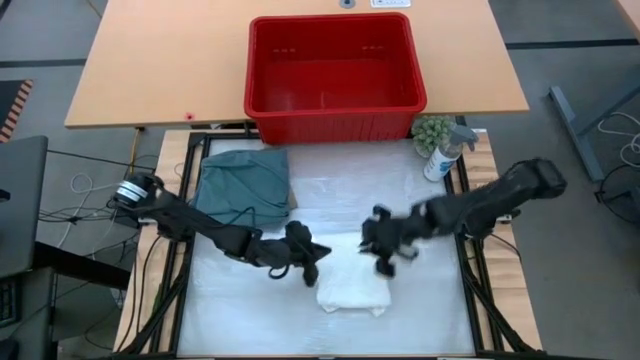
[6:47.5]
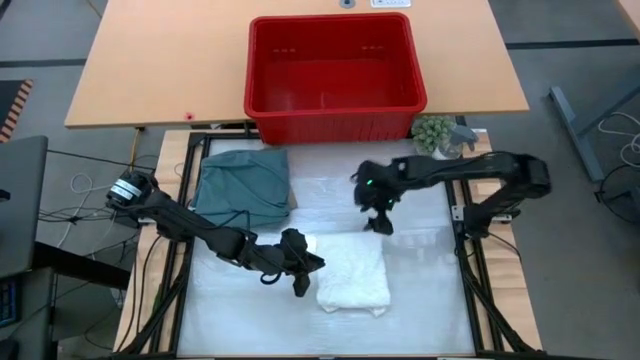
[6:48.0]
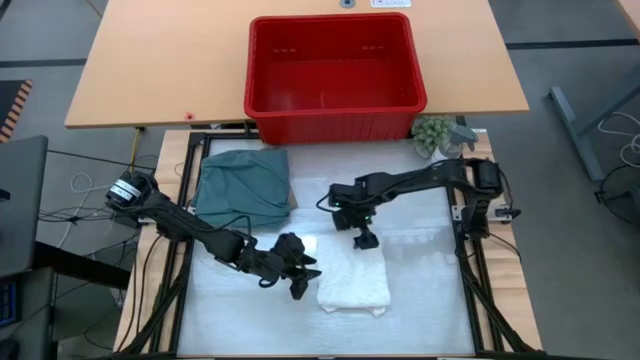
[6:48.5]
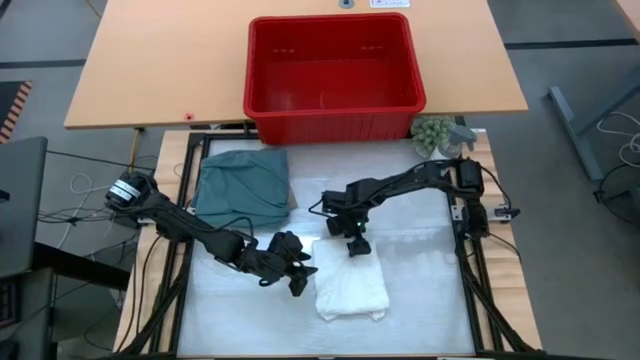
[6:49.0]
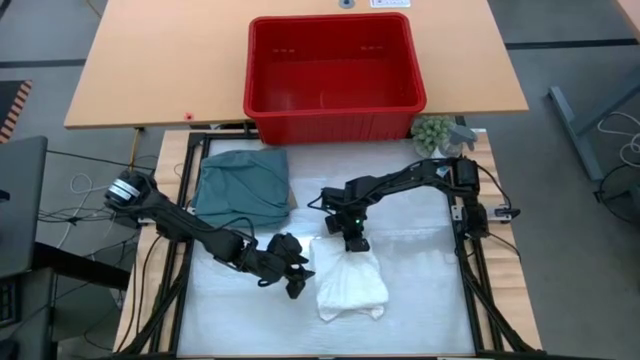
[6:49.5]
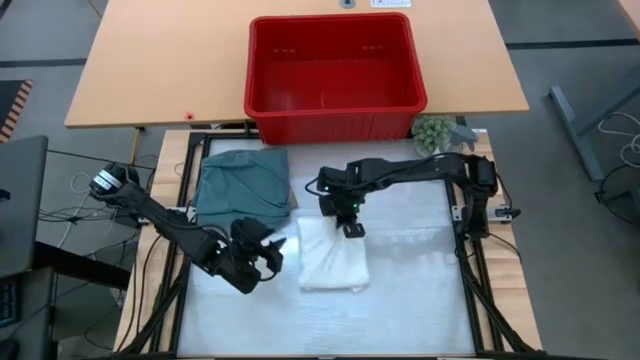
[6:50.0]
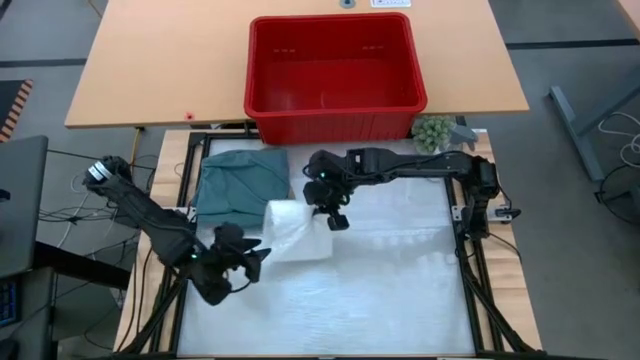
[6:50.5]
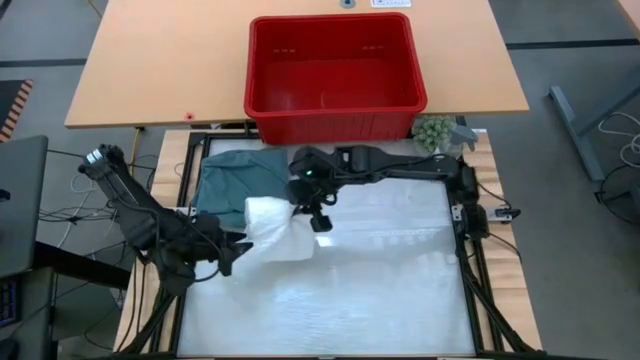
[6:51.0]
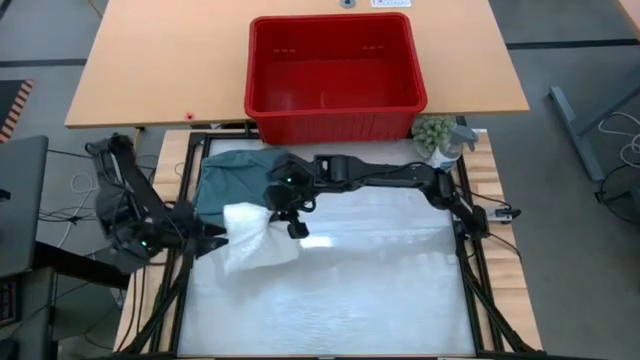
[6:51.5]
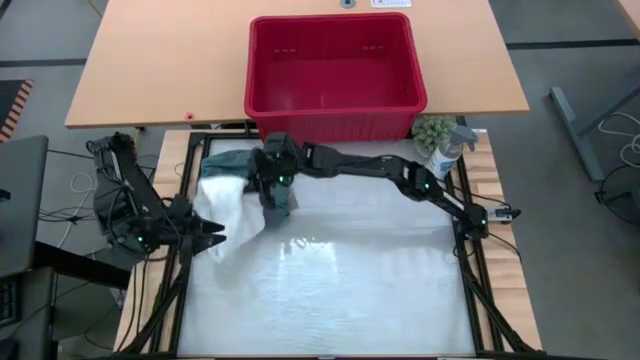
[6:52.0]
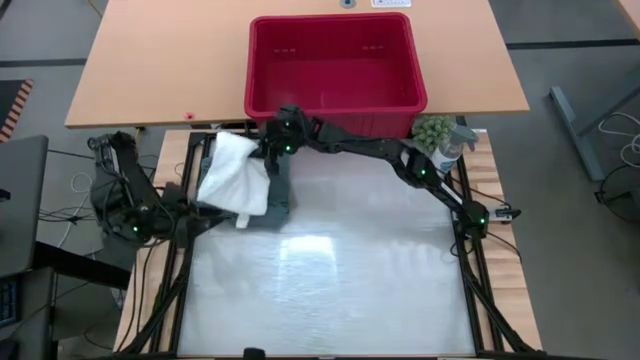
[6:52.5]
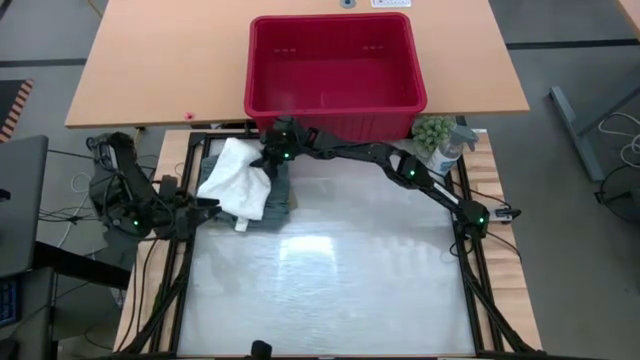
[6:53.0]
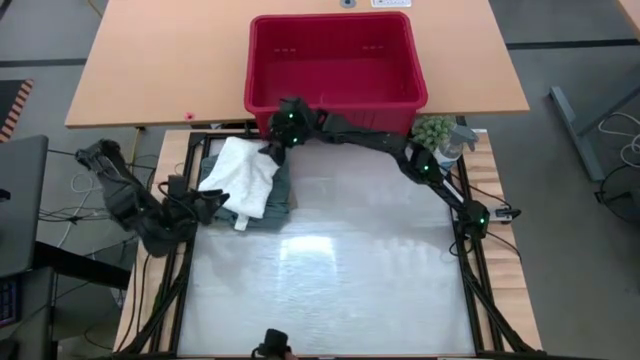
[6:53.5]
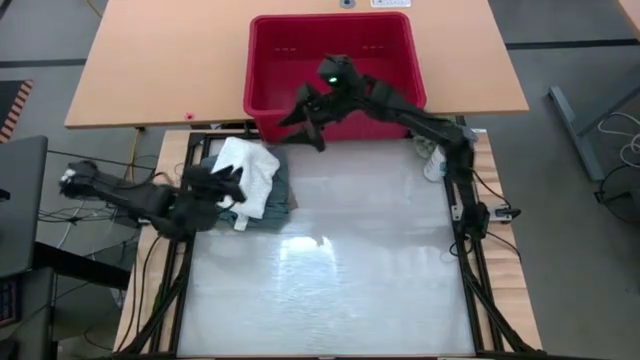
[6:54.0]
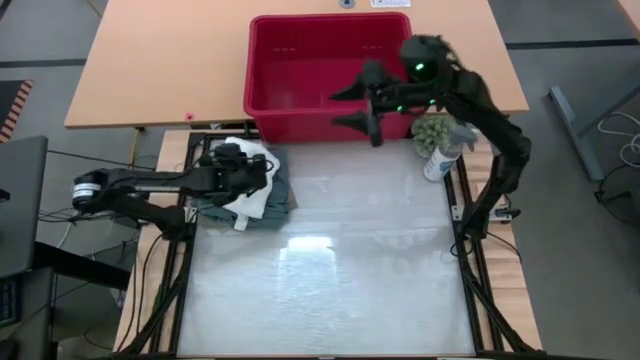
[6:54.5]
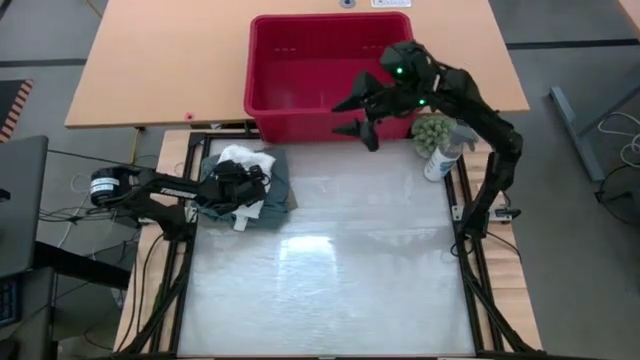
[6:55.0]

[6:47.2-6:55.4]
Task: Fold Laundry from Bin
Stack the folded white shirt on top of the folded blue pants

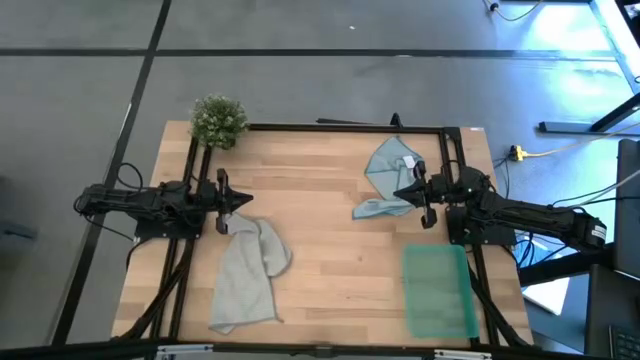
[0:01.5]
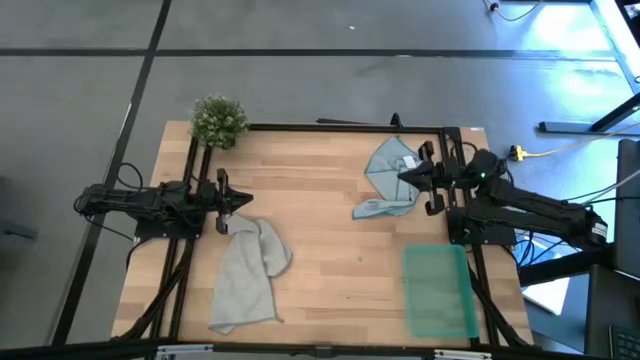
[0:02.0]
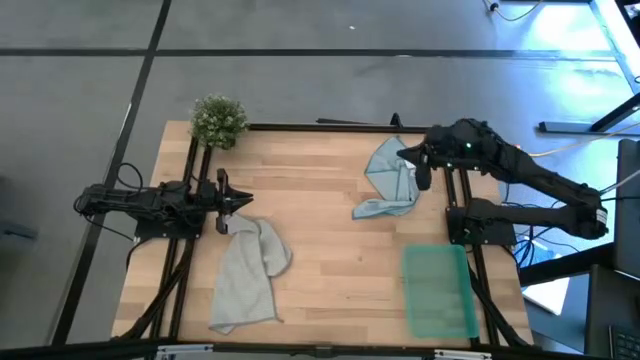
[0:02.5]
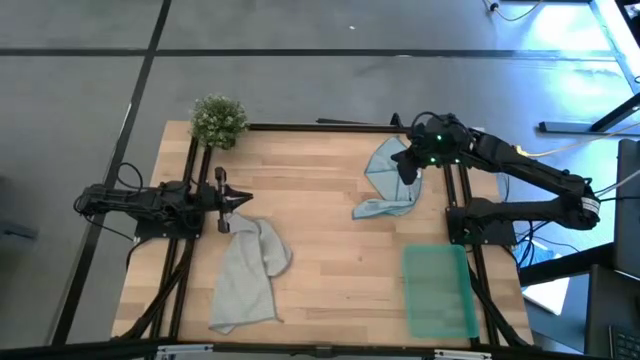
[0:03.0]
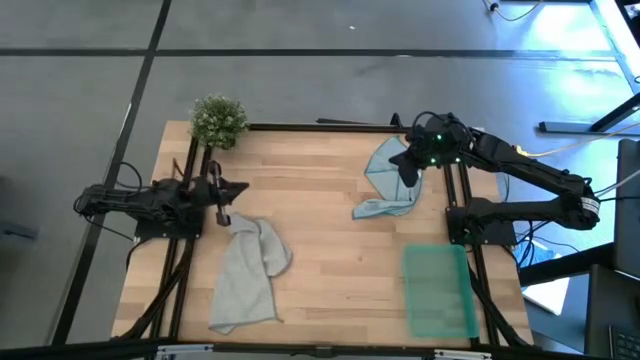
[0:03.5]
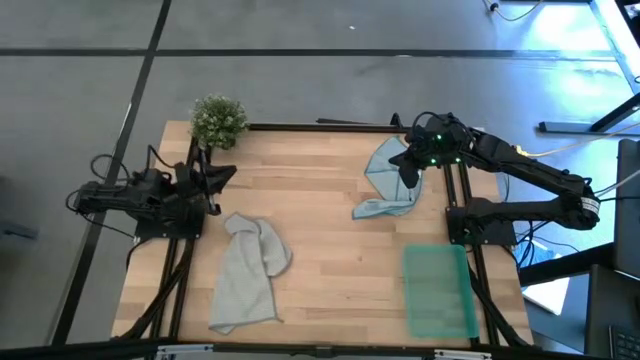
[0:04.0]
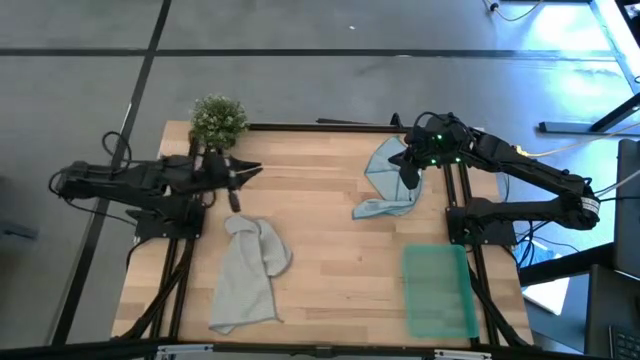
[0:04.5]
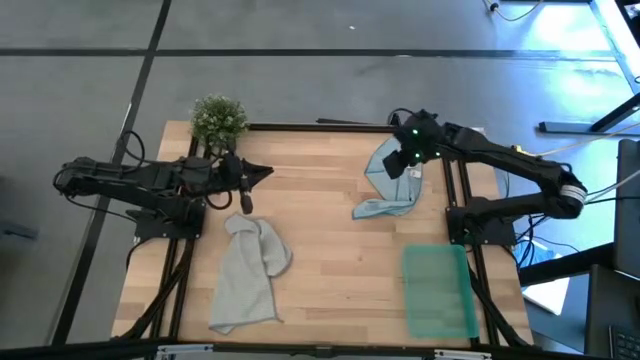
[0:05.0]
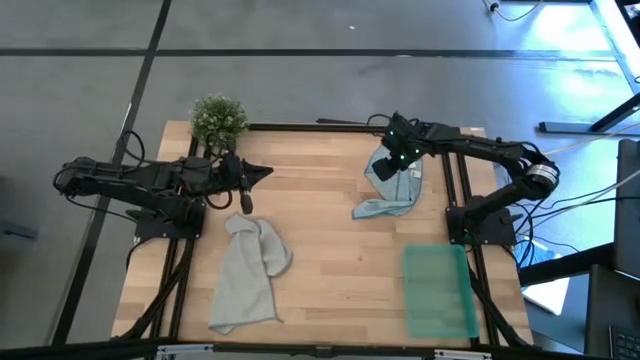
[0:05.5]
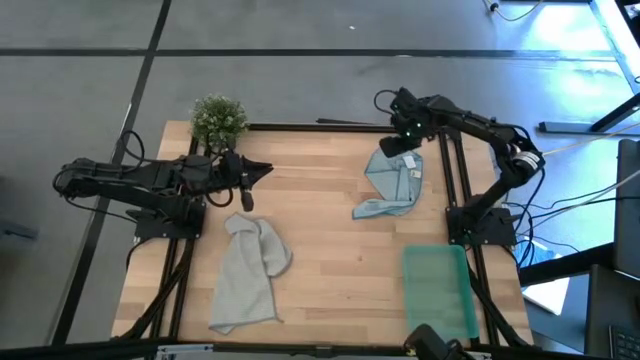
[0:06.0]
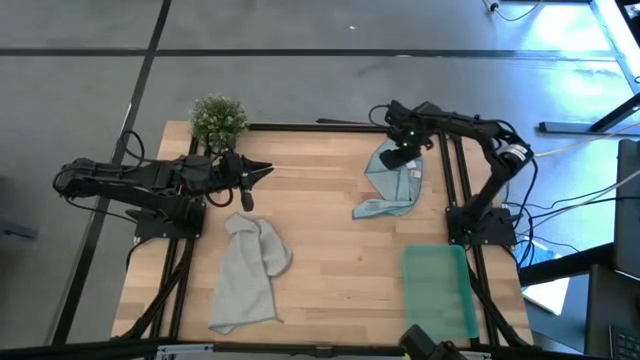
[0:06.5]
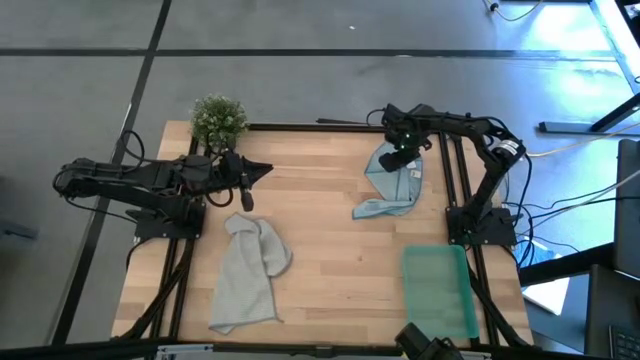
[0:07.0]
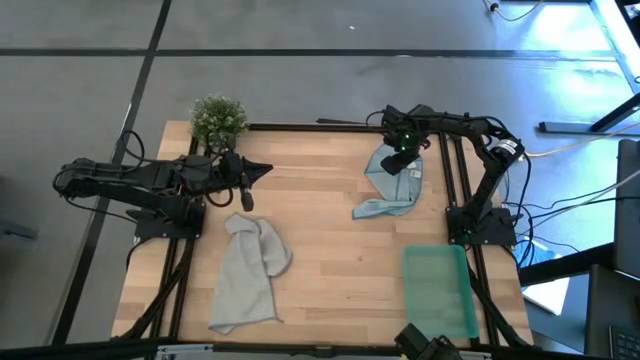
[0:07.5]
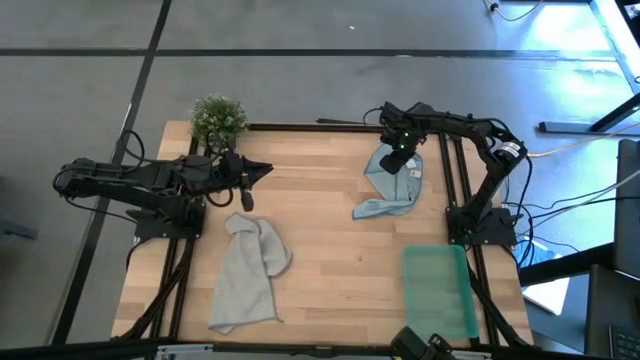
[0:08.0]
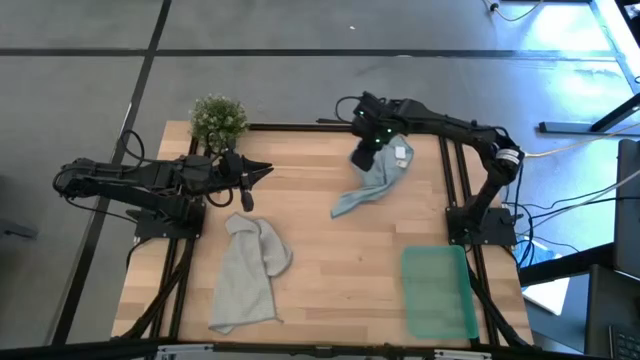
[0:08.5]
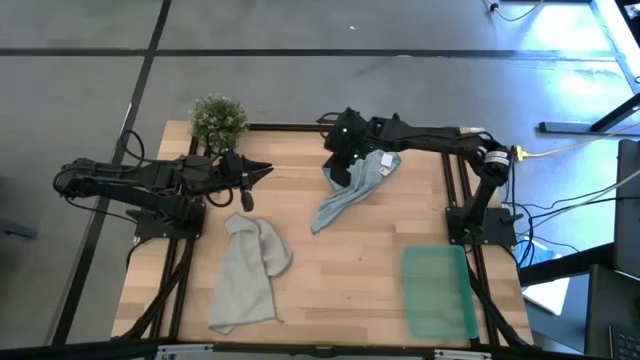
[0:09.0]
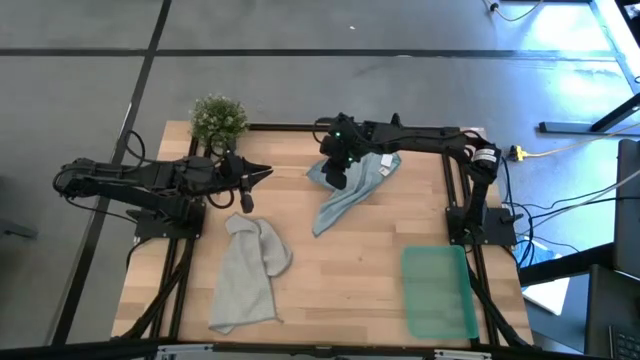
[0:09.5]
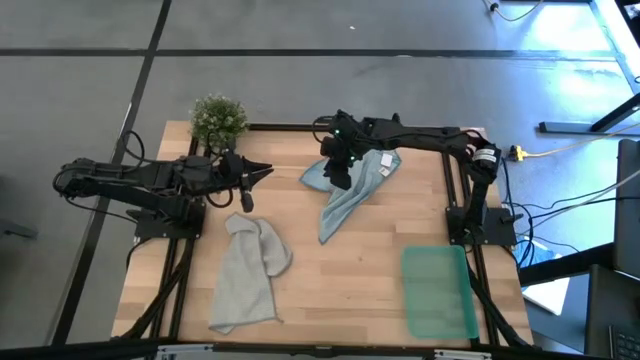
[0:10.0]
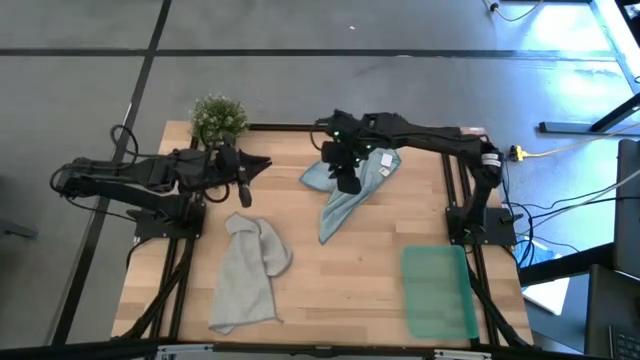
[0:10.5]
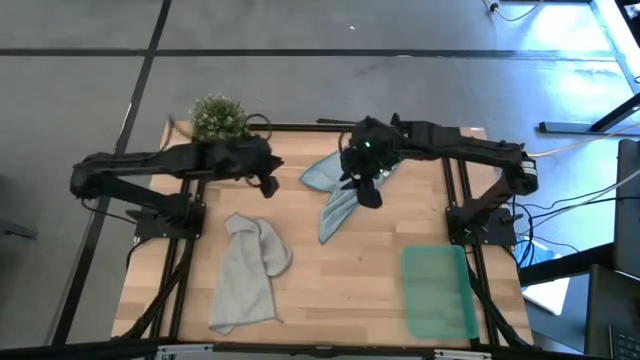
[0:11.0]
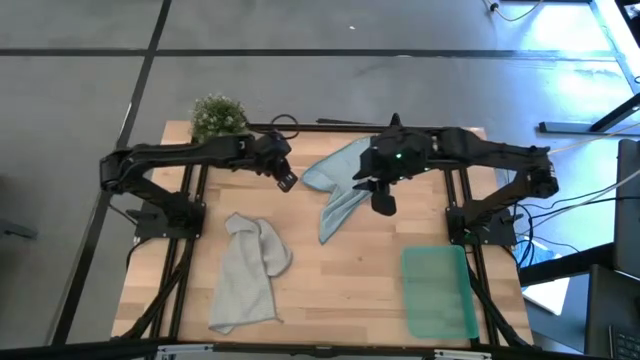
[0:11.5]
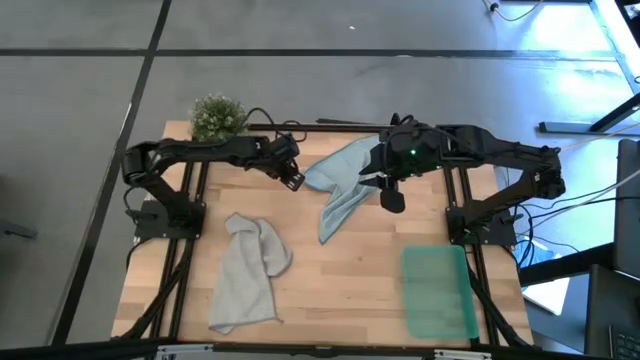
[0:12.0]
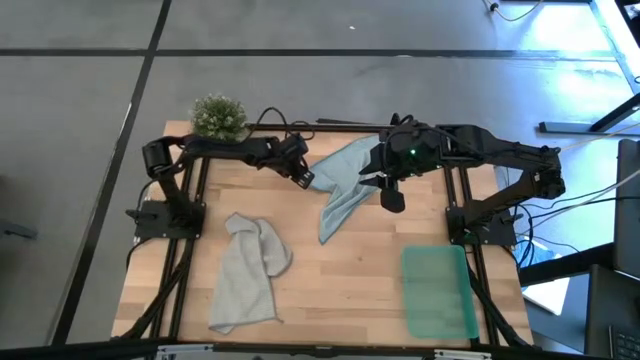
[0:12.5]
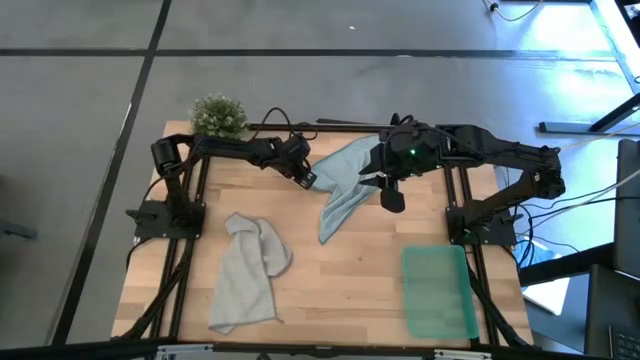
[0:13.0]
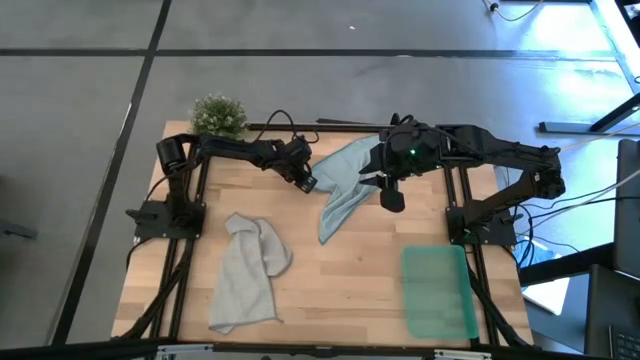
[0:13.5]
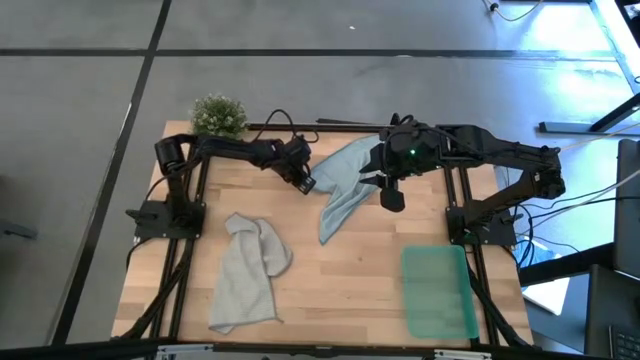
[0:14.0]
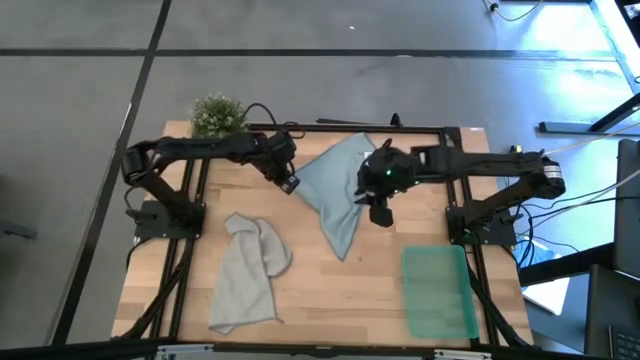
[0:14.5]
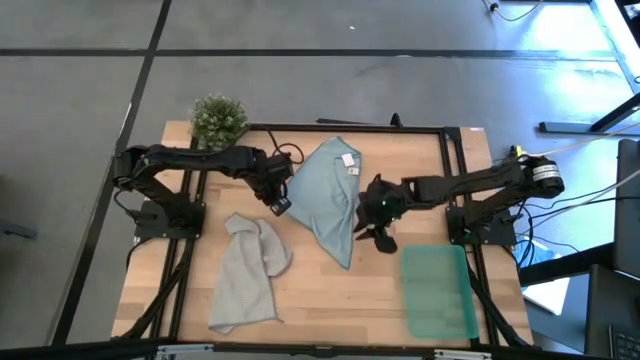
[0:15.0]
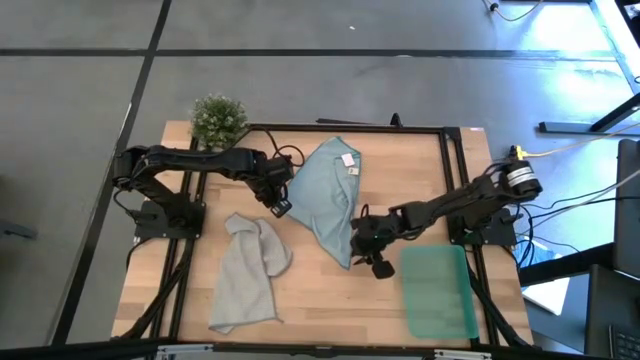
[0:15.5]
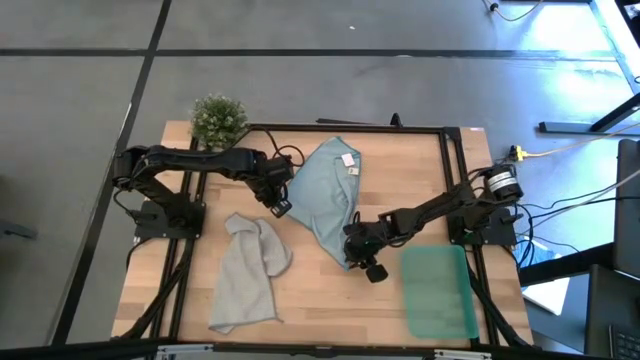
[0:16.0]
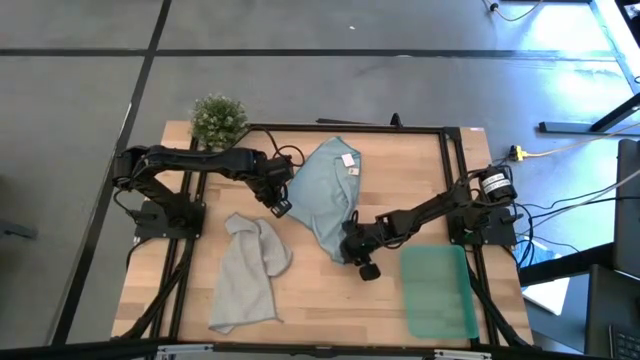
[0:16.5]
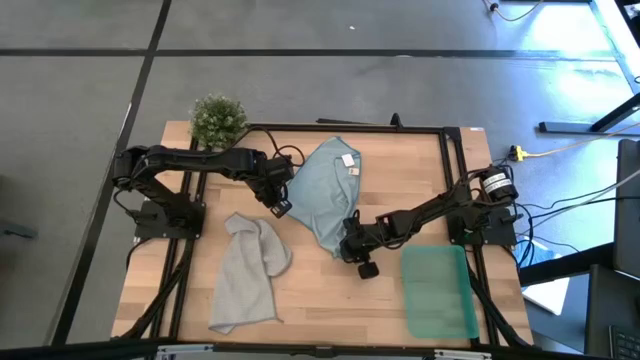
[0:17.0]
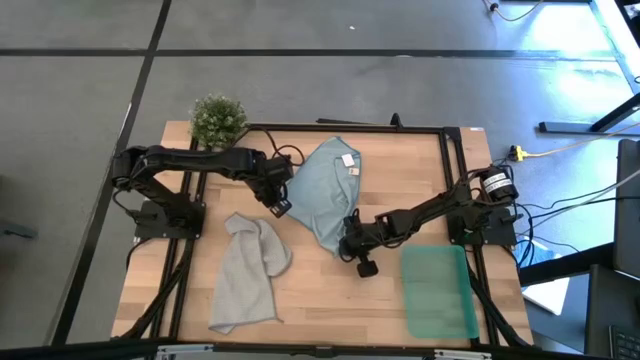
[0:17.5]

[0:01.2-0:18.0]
Task: Roll microfiber towels into tight, uniform cylinder then place into a basket
Fold the blue towel
